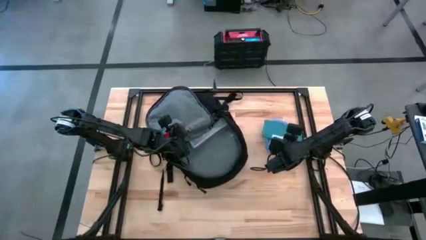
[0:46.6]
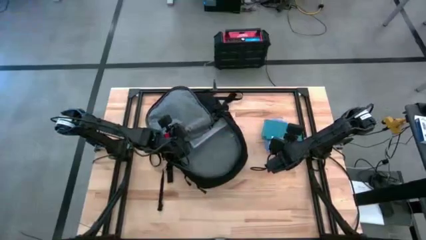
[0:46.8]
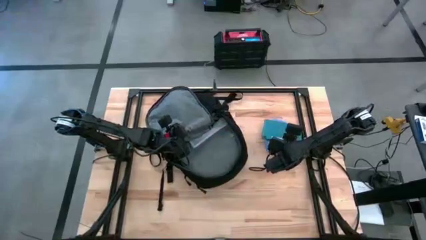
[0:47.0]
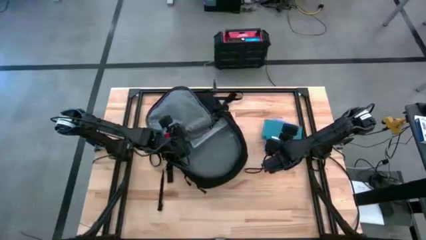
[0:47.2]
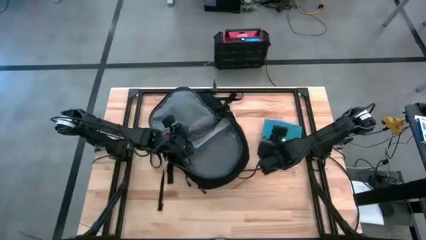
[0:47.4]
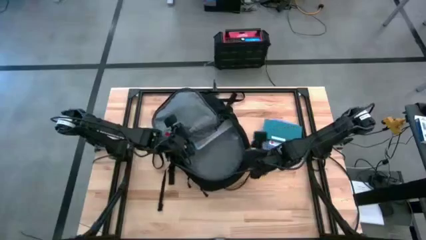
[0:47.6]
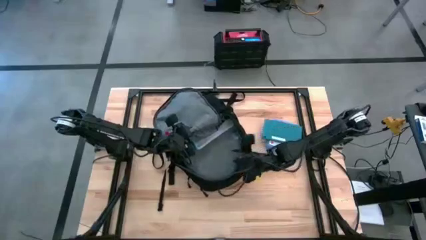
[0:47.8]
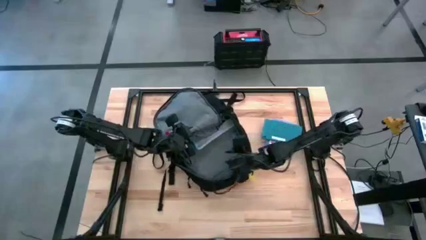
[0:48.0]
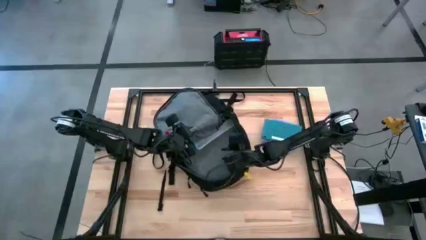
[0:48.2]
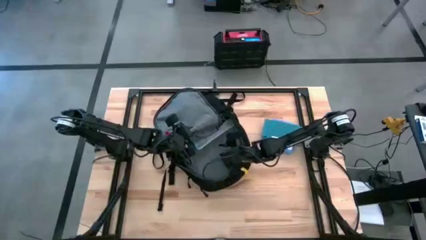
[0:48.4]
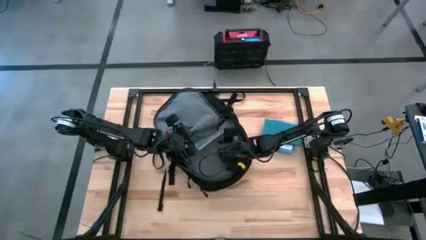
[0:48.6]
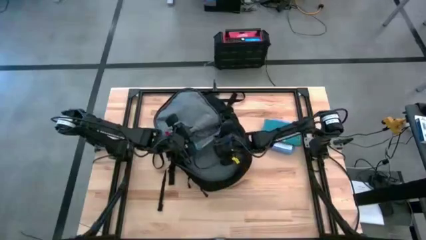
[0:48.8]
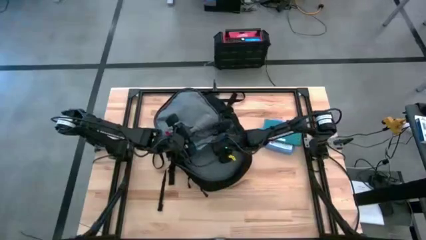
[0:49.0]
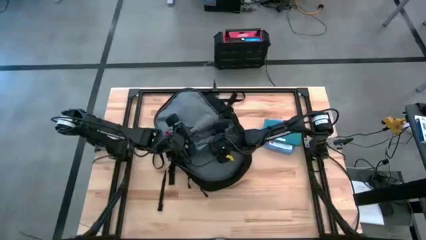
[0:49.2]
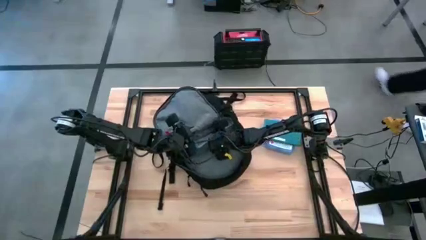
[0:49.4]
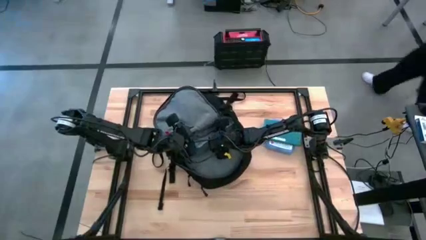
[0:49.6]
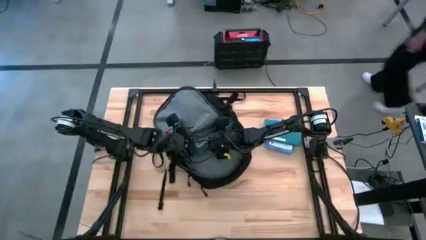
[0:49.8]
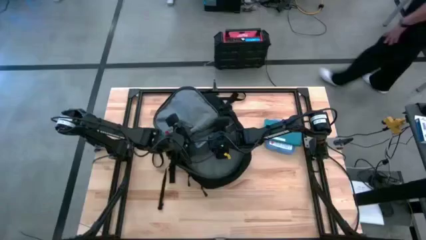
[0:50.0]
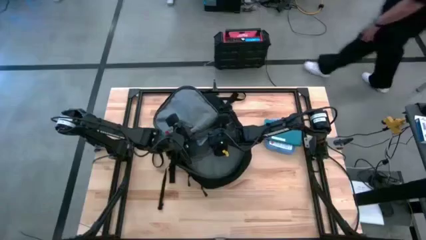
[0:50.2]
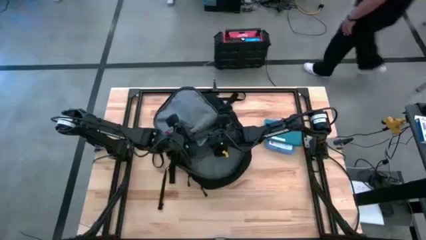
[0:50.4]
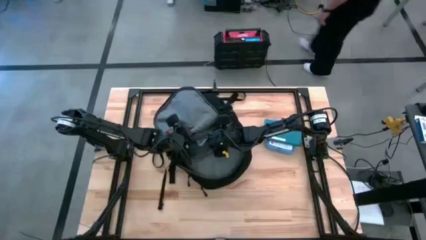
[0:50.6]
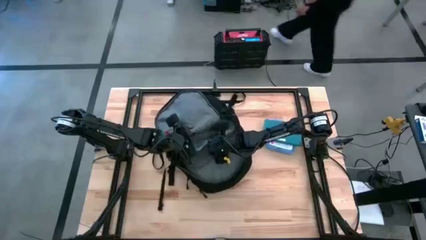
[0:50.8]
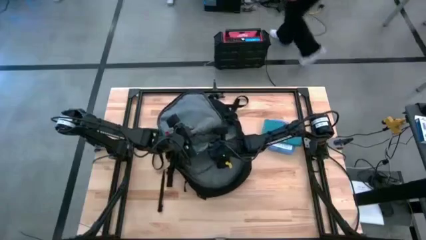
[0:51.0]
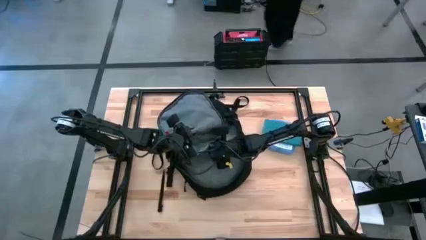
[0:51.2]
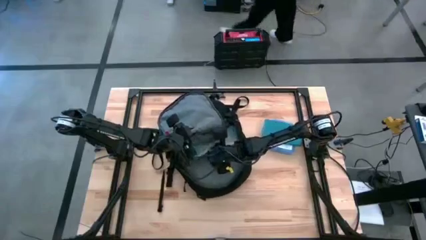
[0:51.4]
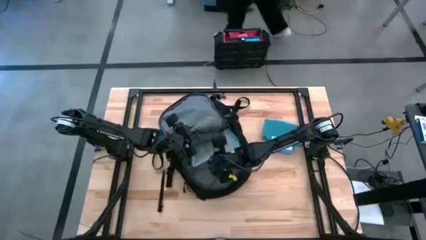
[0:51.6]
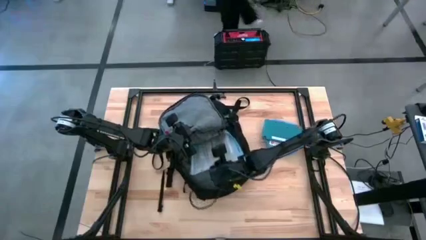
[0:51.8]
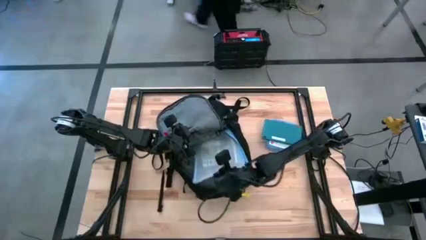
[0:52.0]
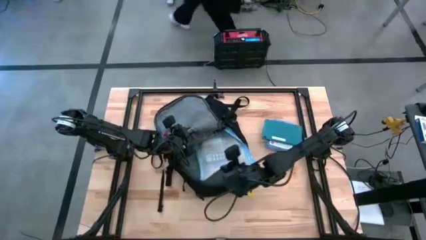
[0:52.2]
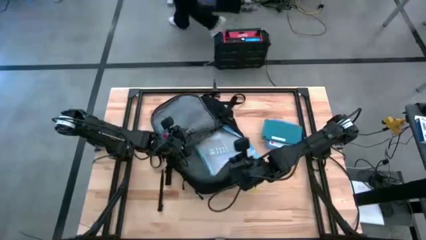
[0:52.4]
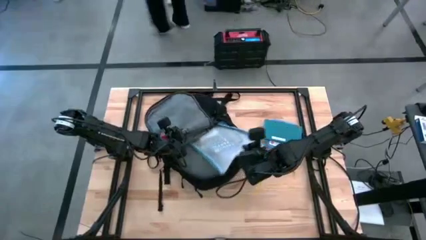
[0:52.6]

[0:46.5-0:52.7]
Task: Unpack backpack
Remove the white mesh zipper pouch from the backpack

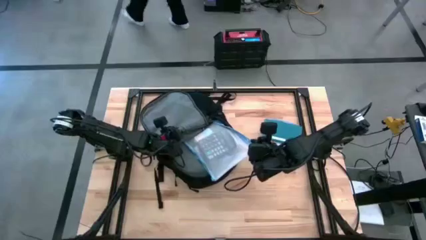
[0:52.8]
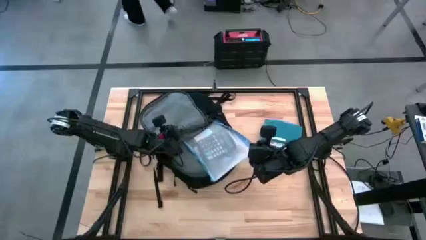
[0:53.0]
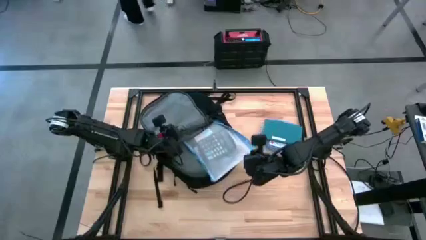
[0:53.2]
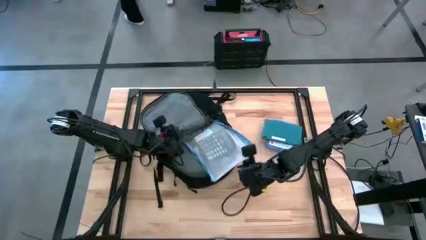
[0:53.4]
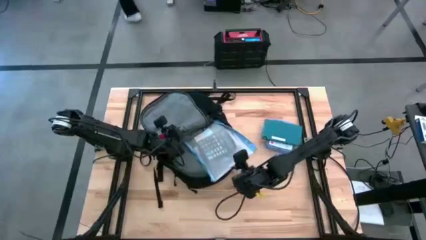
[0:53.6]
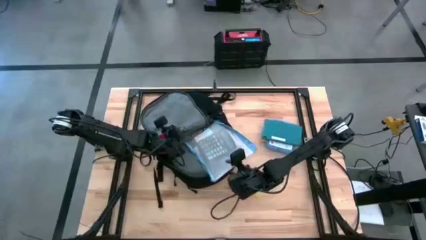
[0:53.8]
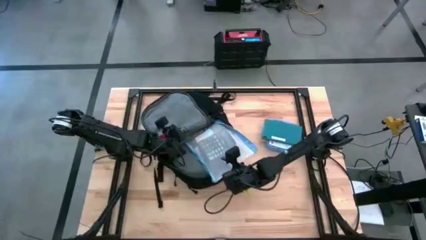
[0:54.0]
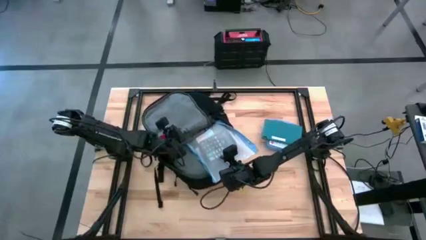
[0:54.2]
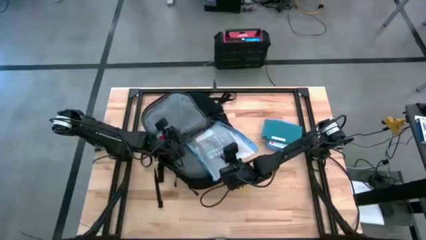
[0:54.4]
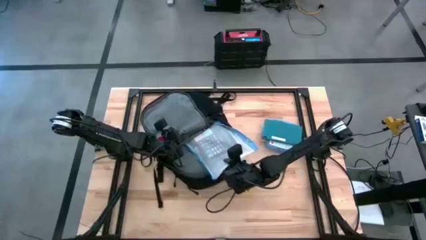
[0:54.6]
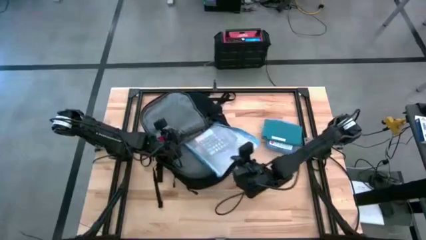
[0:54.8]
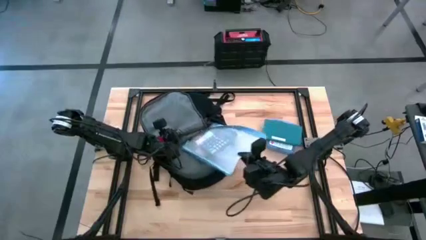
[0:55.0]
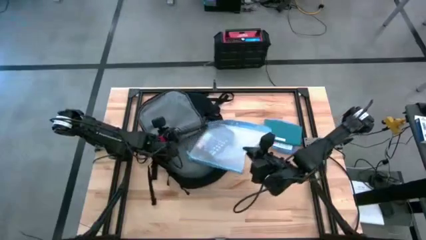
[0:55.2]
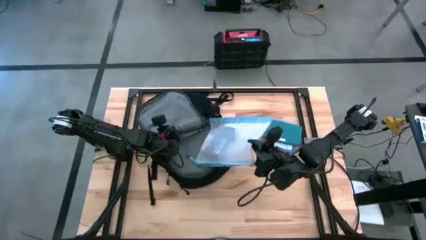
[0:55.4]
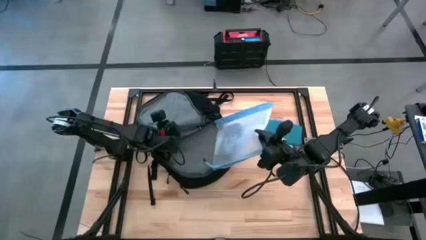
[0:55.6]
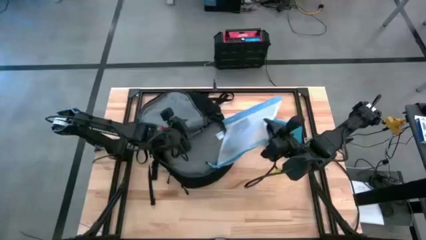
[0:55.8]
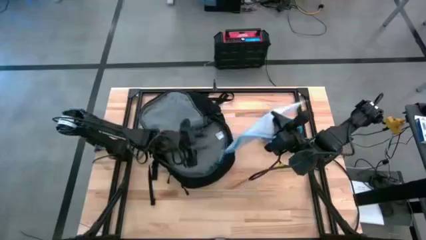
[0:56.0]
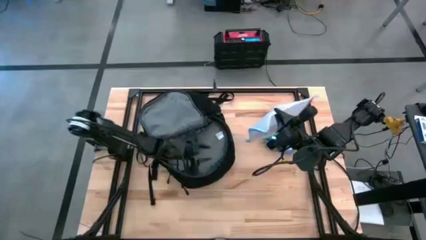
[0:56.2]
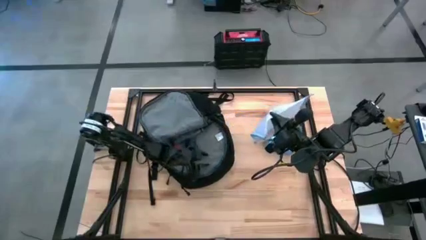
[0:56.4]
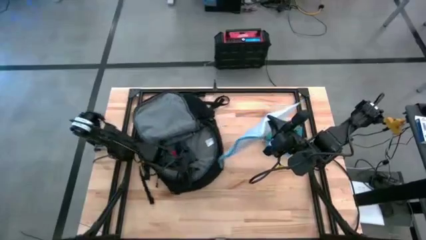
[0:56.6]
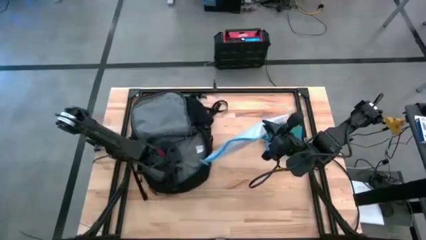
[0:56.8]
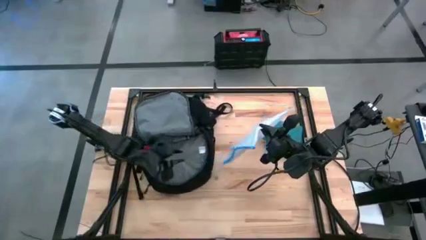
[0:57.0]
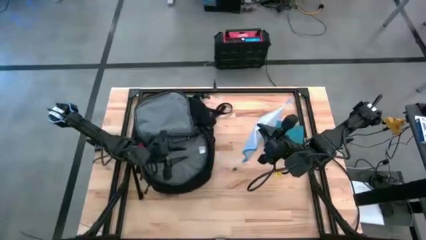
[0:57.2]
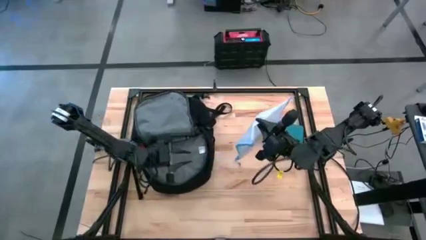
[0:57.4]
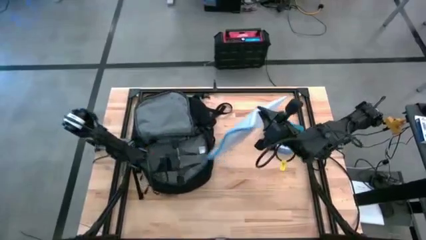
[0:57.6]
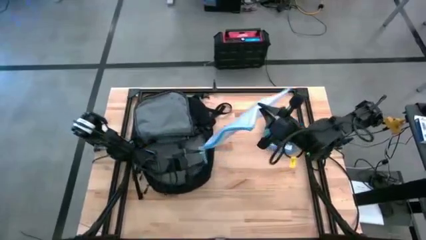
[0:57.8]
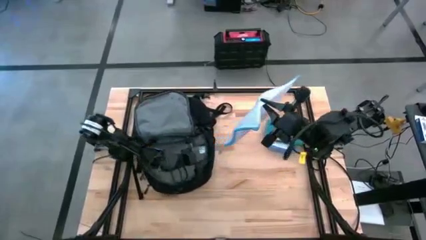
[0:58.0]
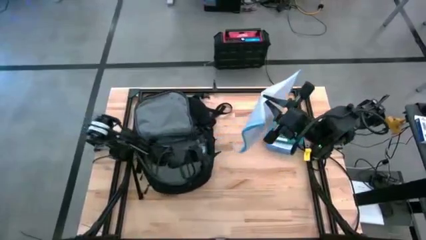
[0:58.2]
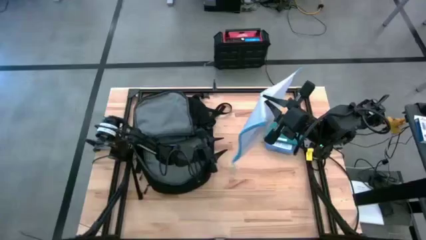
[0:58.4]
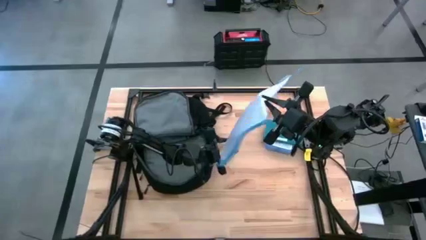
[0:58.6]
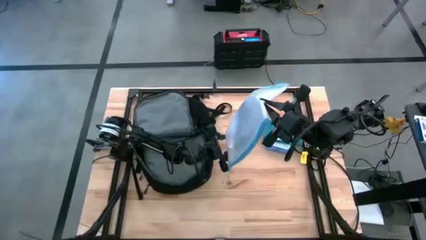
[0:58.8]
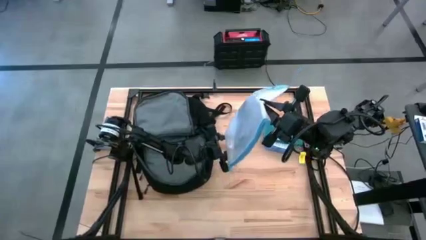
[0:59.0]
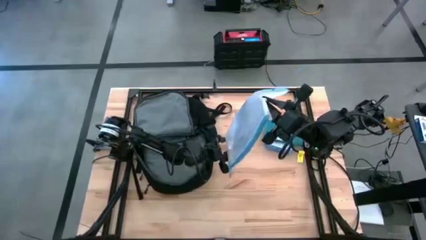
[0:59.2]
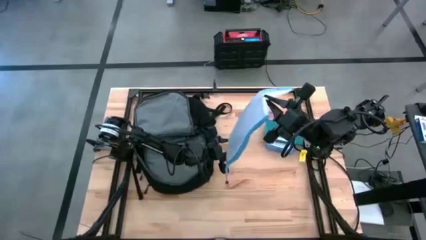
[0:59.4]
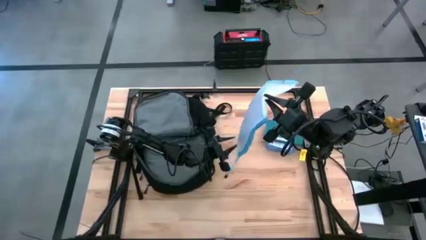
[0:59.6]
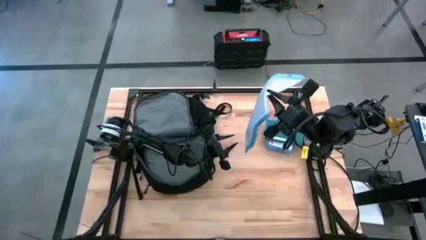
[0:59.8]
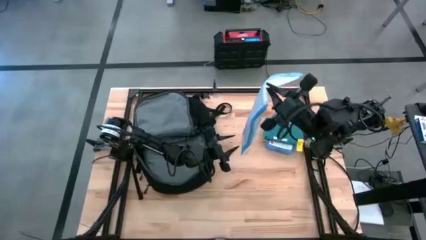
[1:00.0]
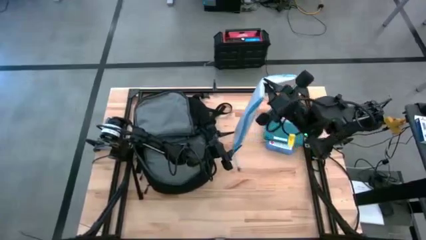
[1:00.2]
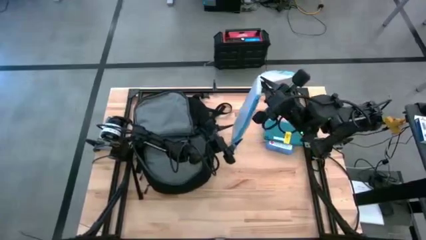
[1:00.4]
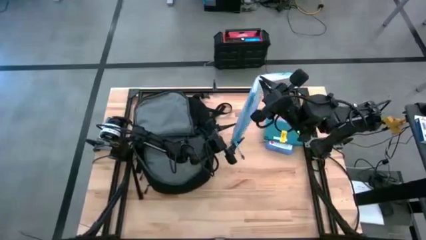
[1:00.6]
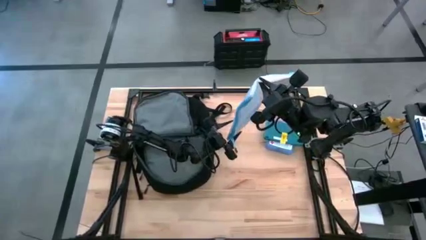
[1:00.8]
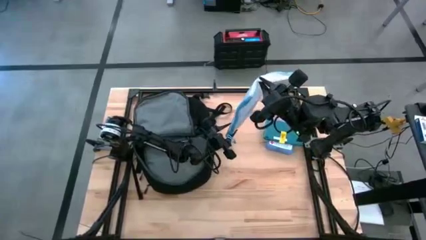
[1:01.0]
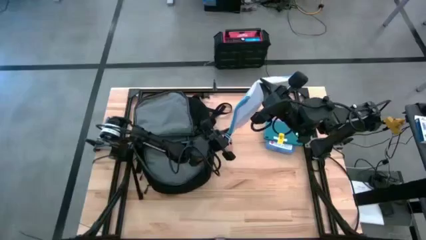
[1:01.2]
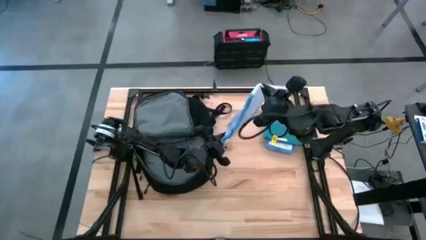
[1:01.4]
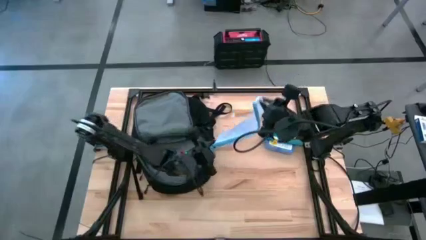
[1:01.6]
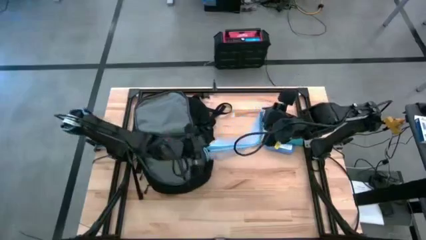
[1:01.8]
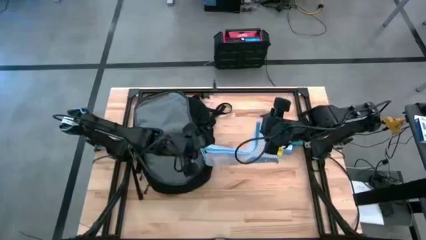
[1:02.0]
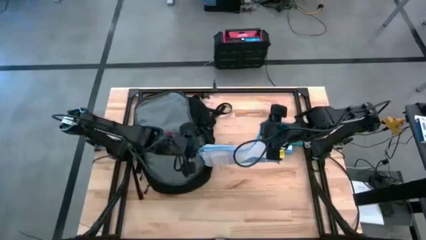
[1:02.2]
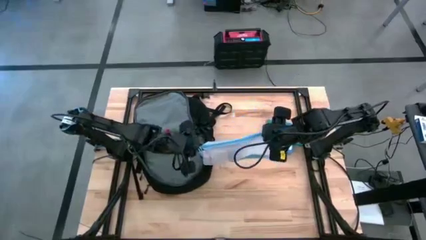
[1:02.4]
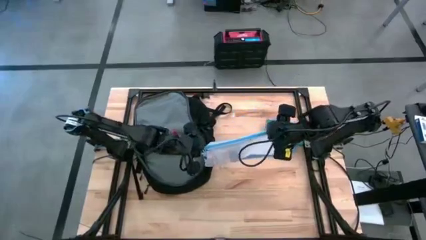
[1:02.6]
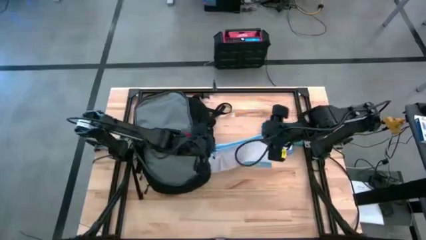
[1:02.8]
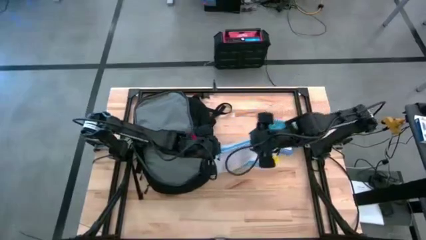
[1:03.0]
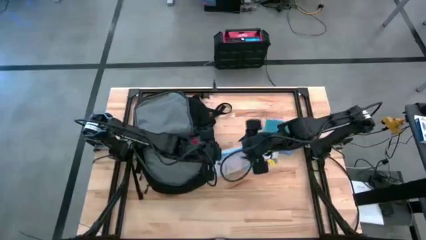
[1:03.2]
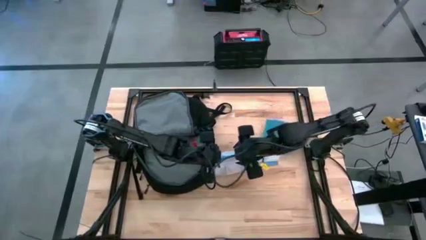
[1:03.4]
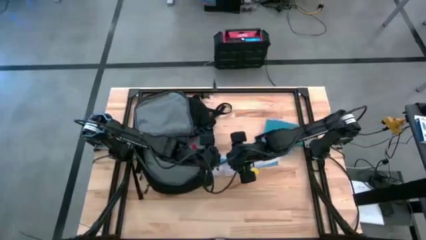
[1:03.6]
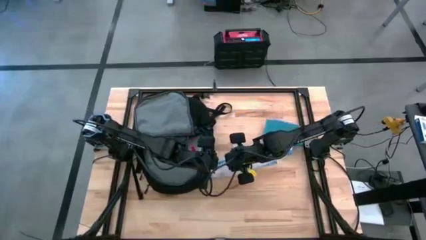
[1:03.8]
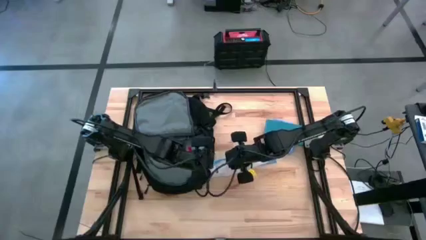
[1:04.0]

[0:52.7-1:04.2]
Remove the white mesh zipper pouch from the backpack
